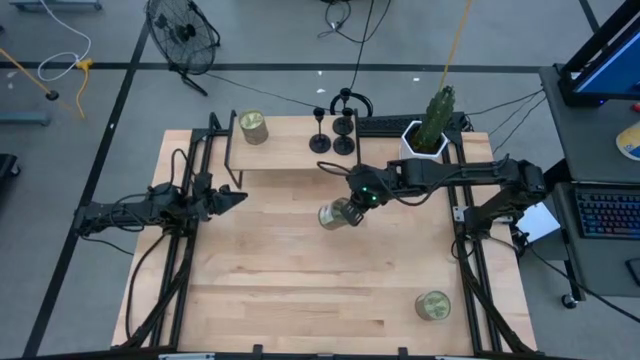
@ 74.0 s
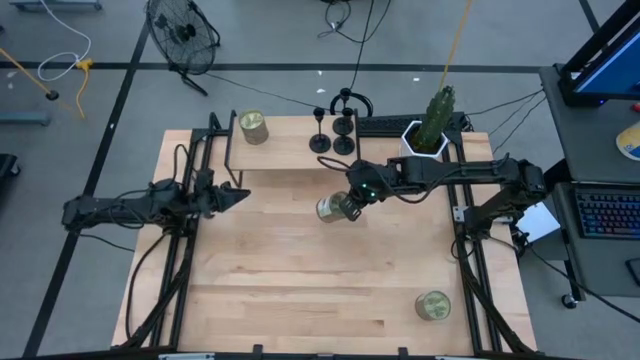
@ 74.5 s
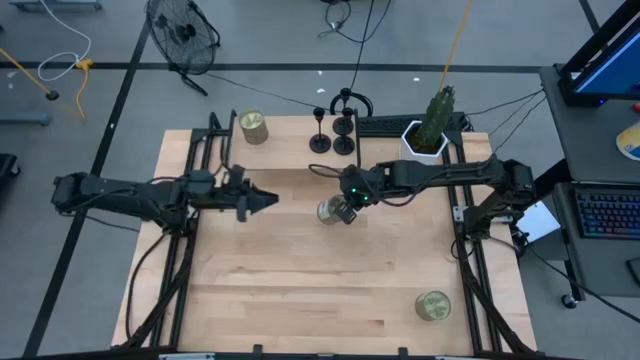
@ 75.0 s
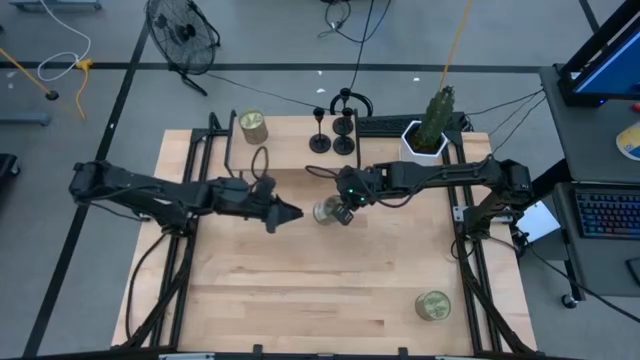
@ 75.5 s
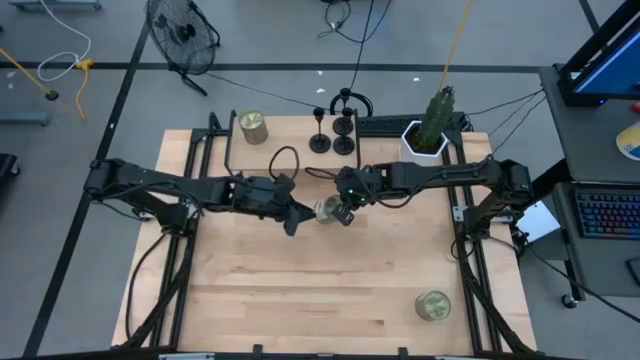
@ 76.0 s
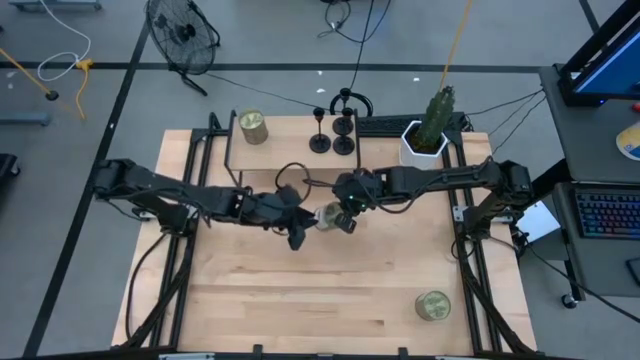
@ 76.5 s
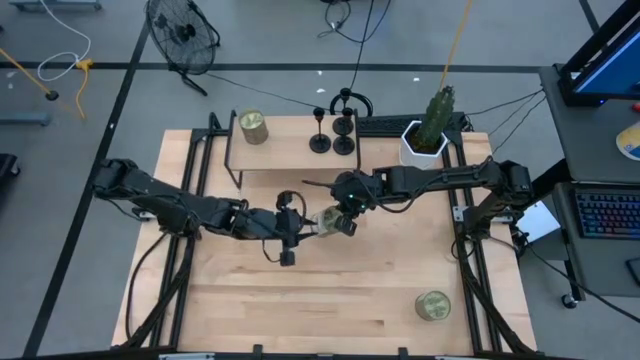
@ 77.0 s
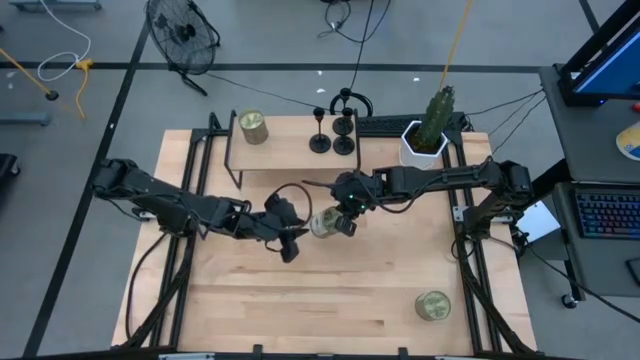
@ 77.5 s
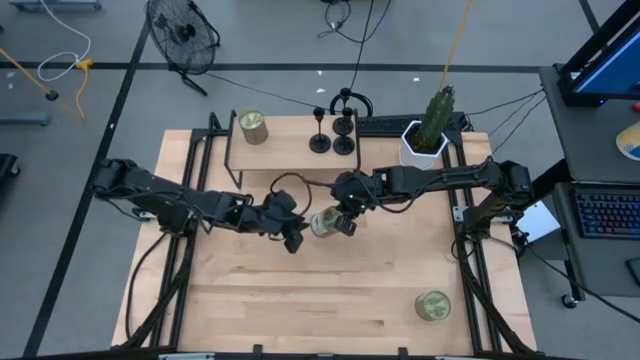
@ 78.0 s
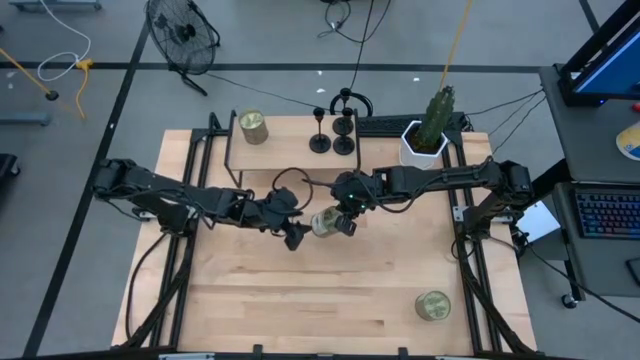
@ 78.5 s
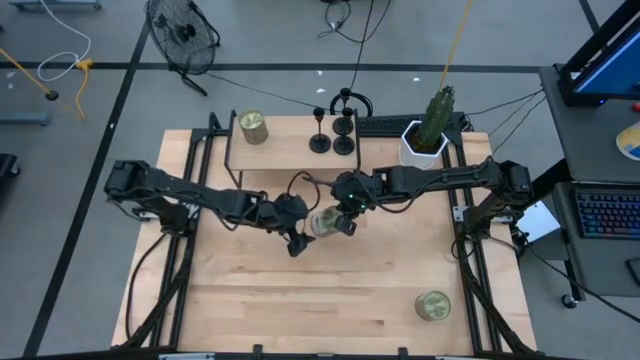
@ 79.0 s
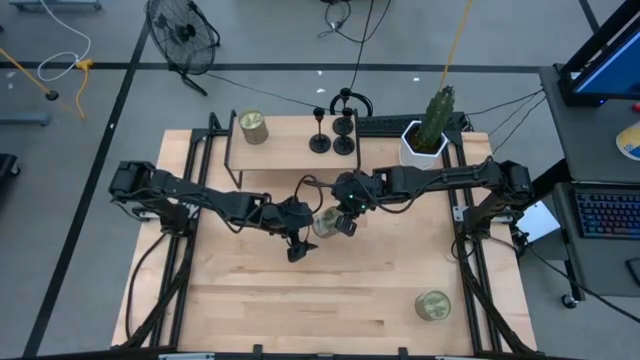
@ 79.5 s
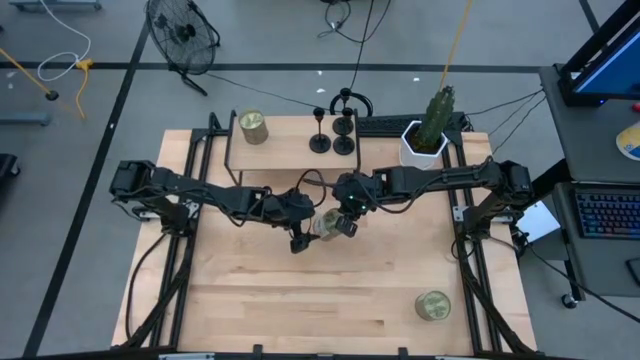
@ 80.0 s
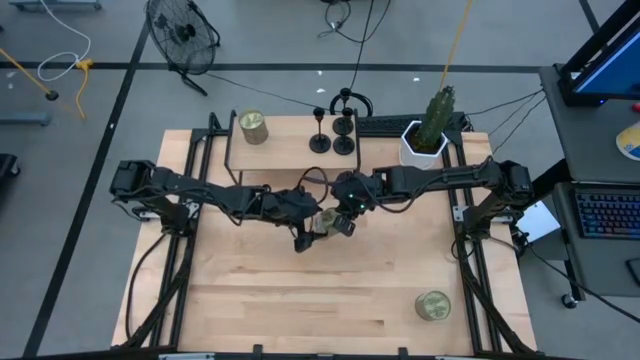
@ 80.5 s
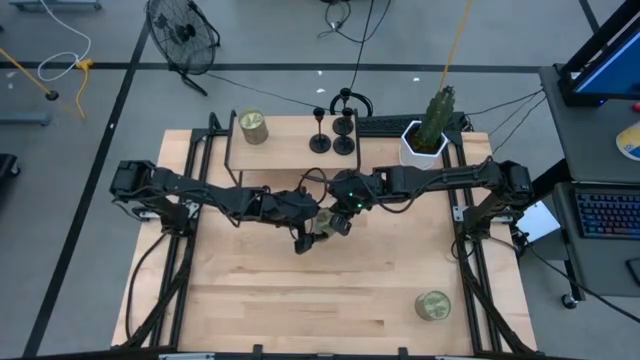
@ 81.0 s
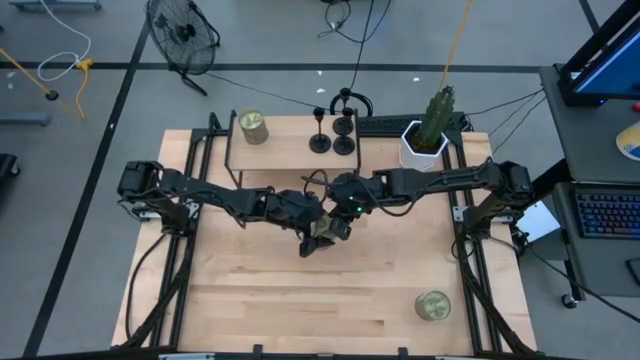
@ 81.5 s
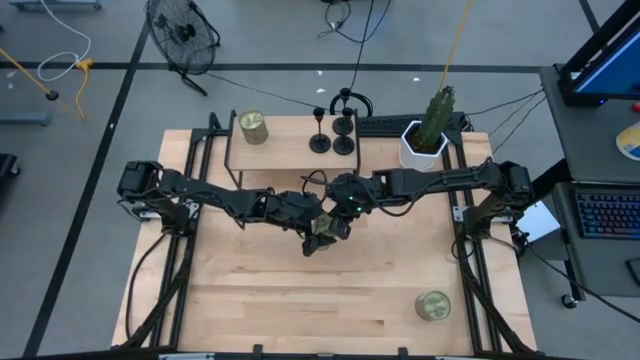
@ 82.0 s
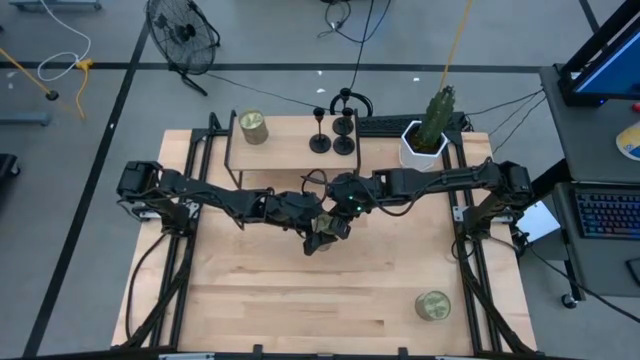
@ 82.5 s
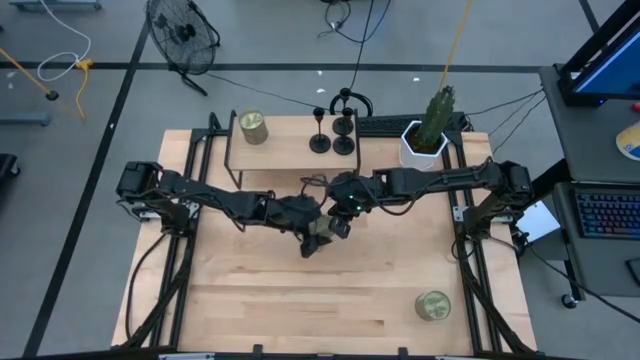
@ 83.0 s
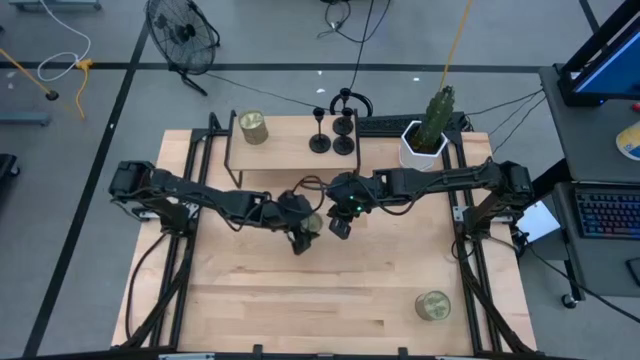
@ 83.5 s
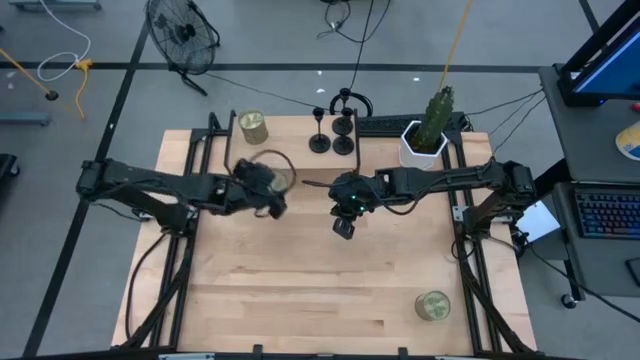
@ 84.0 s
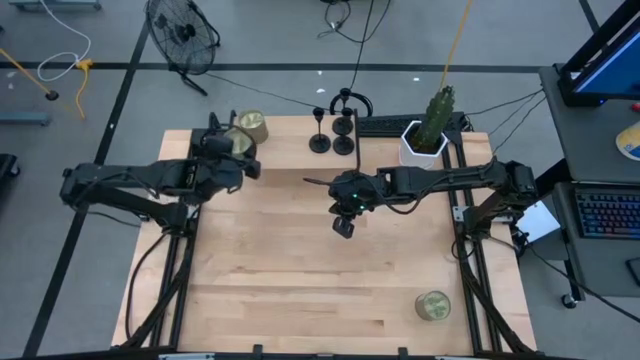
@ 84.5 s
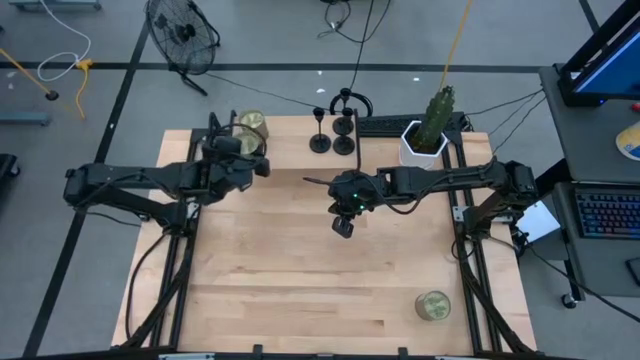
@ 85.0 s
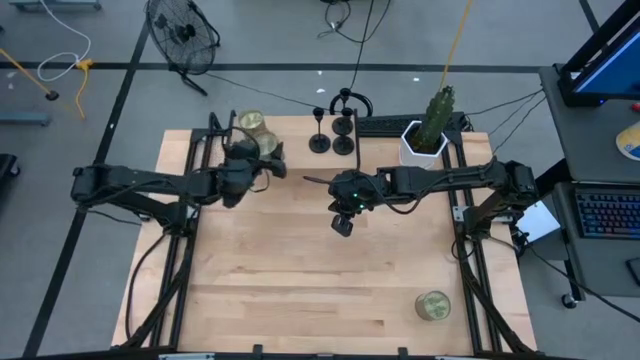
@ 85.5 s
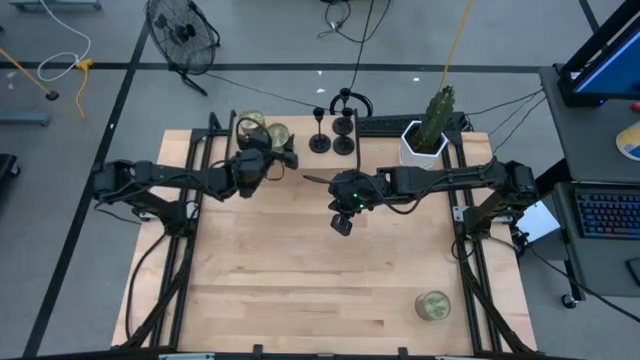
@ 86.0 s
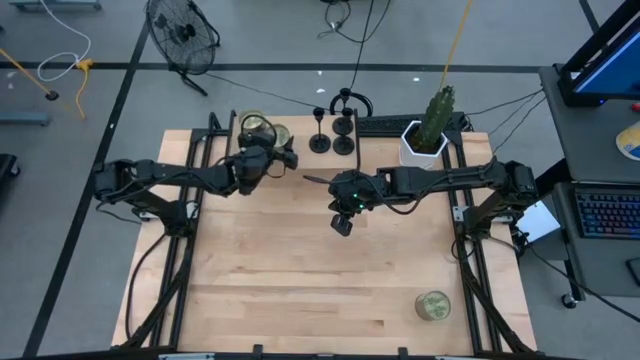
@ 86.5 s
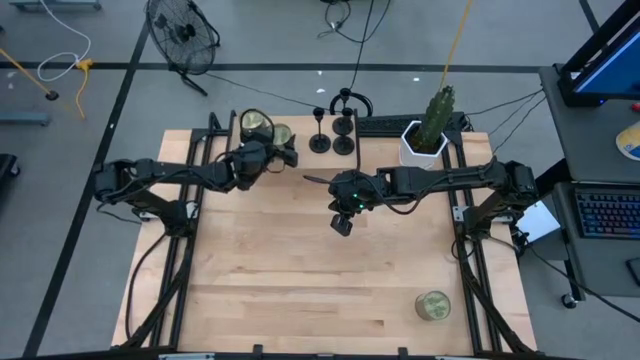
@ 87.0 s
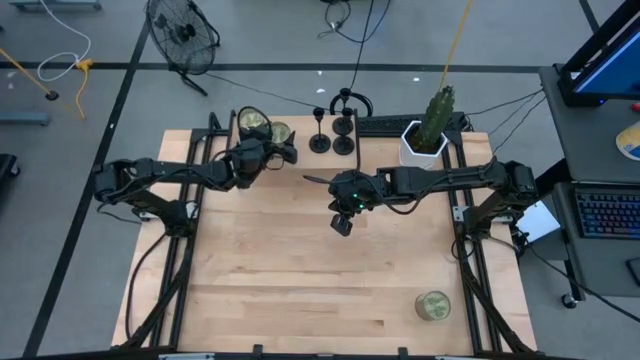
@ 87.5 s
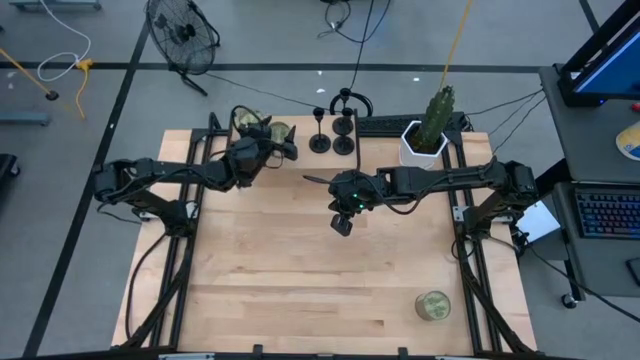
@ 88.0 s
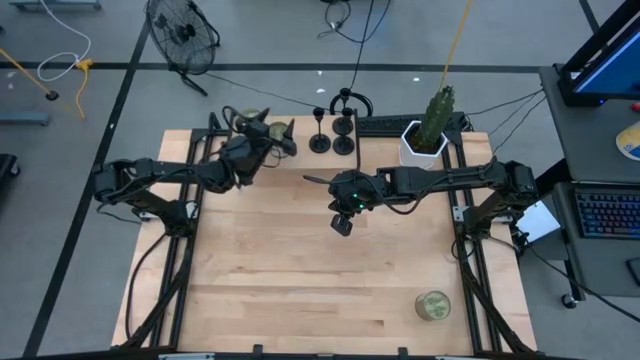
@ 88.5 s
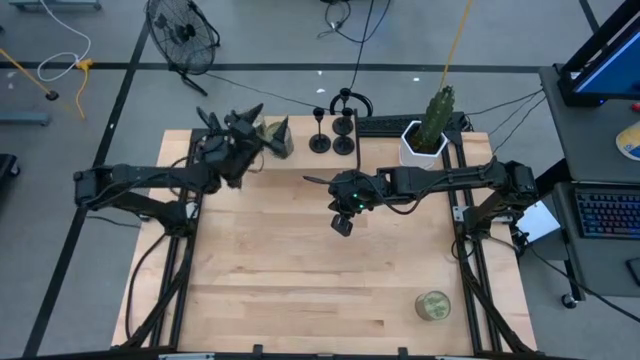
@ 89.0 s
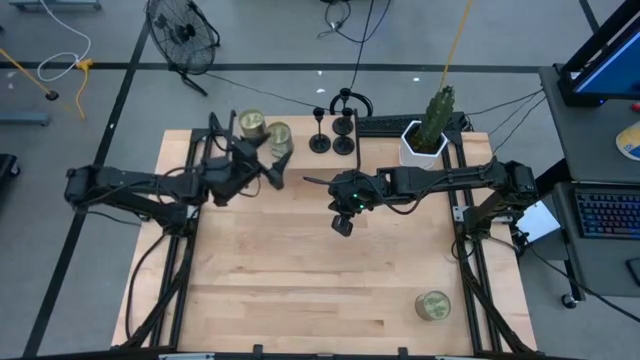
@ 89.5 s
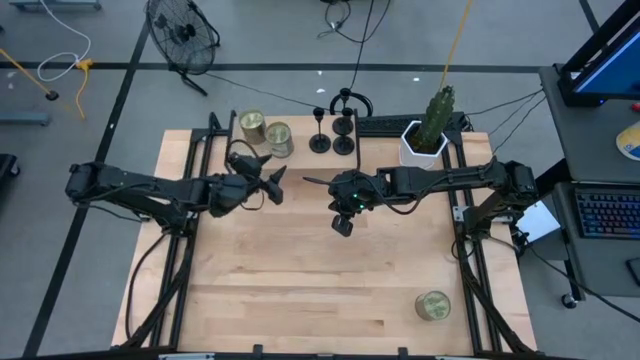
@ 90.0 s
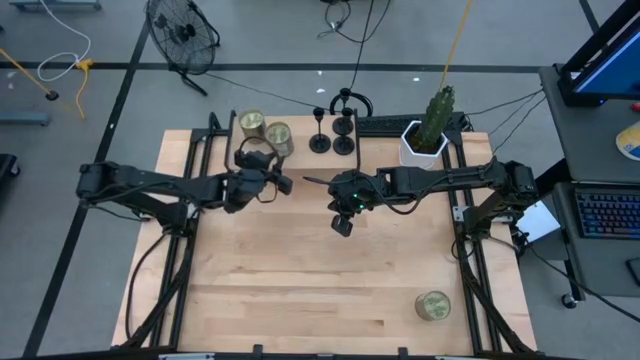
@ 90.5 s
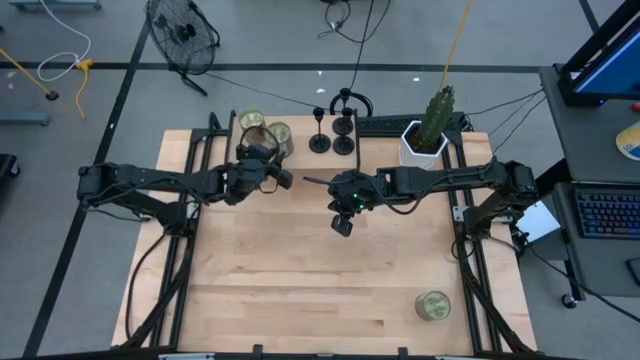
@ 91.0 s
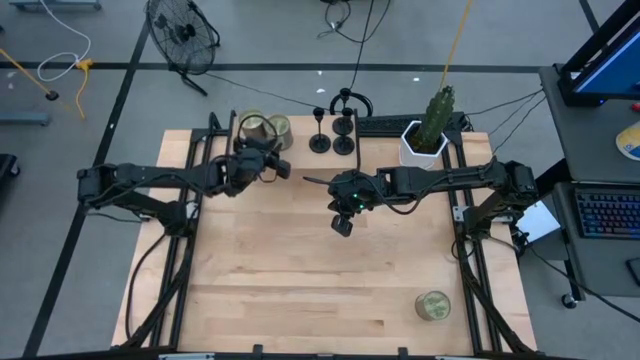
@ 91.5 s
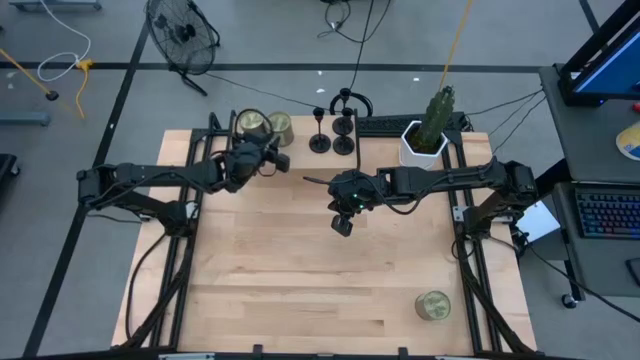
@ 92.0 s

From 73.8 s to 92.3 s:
Task: Pick & Place candle stick holders
Put the top scented candle on the shelf

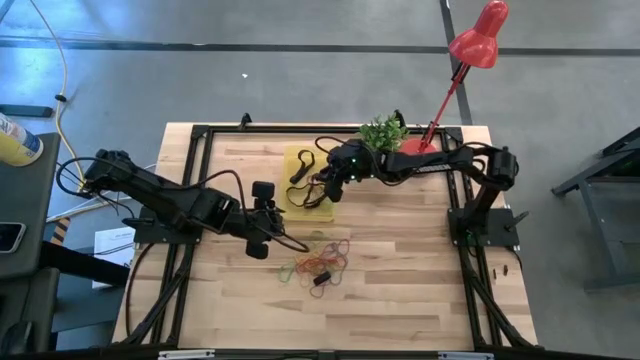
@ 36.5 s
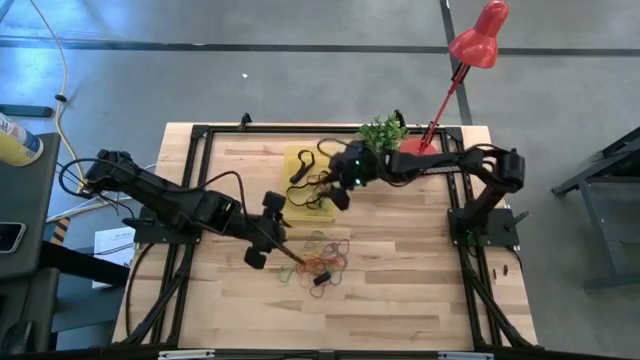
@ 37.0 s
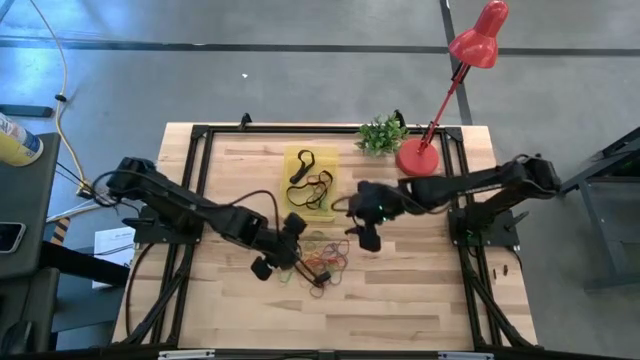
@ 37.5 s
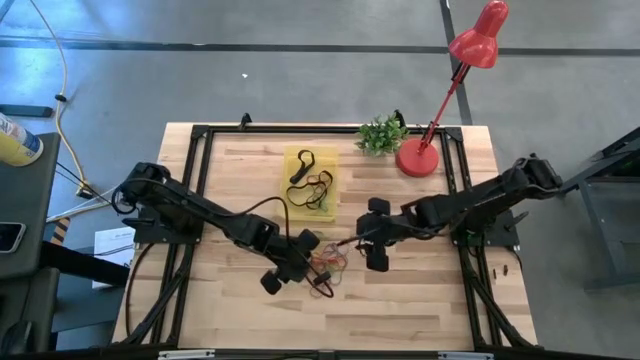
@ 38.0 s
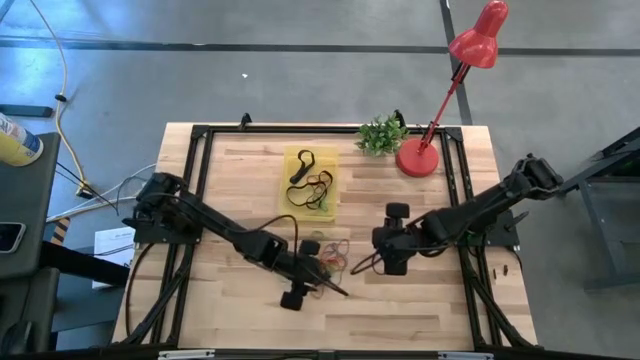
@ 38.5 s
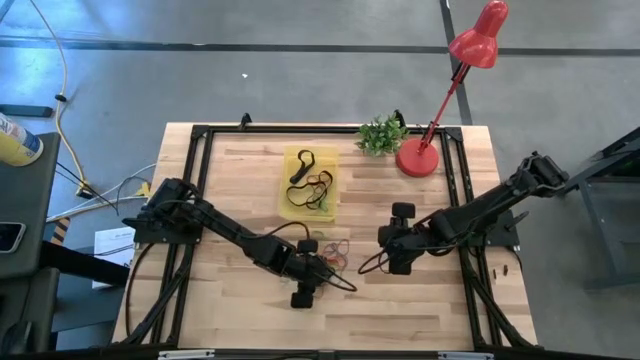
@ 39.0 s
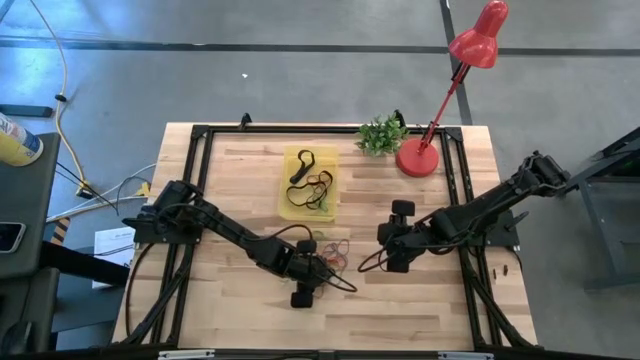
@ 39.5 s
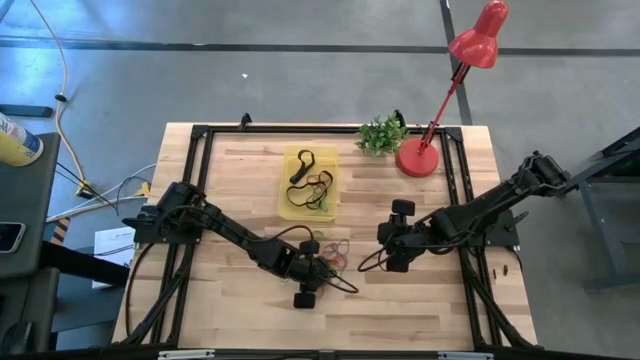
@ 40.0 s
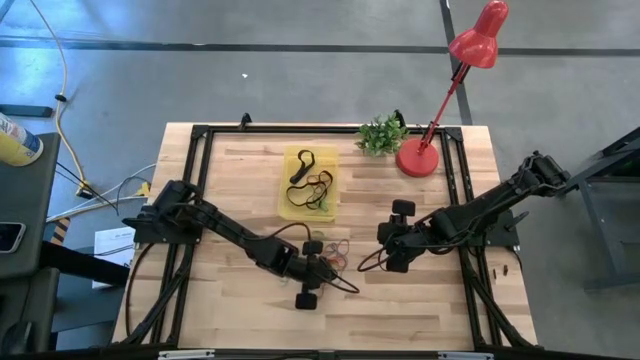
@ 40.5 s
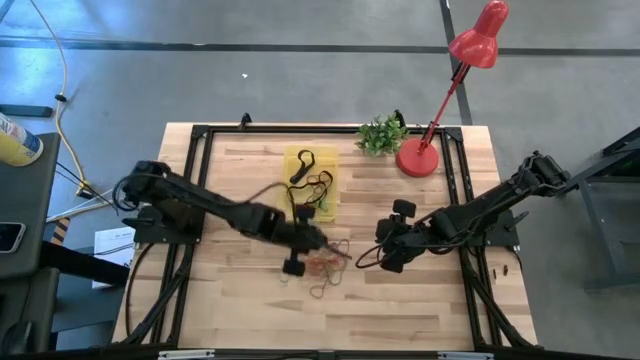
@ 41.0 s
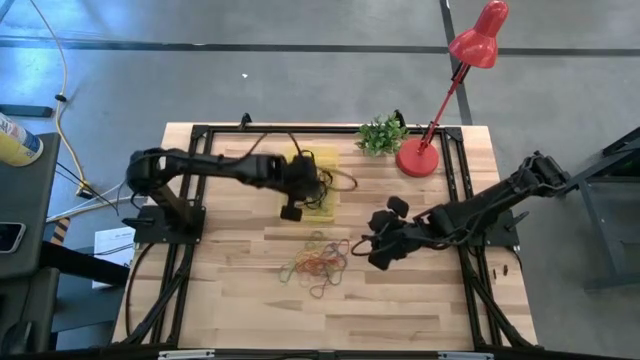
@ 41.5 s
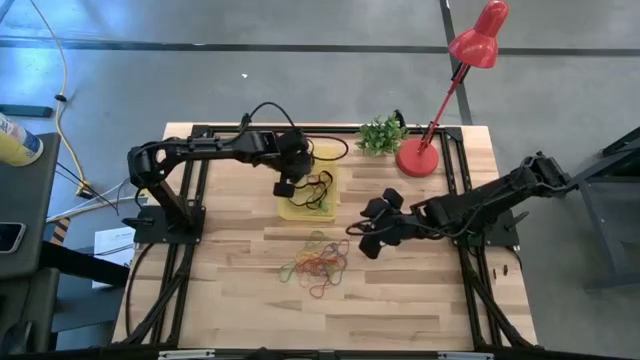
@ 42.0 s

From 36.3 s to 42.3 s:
Task: Pick and place rubber bands into bin
Put the black rubber band into the yellow bin
